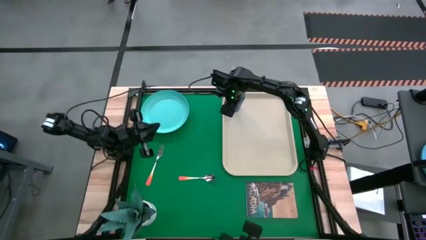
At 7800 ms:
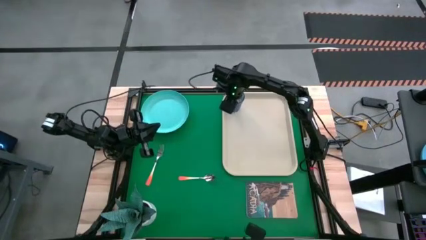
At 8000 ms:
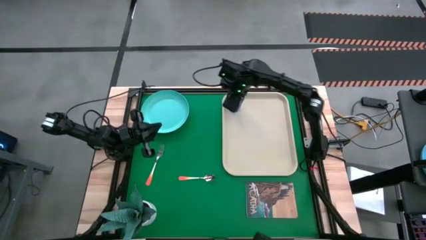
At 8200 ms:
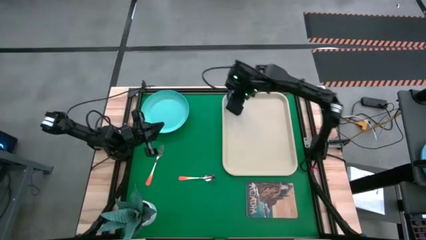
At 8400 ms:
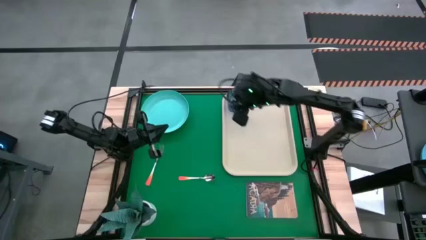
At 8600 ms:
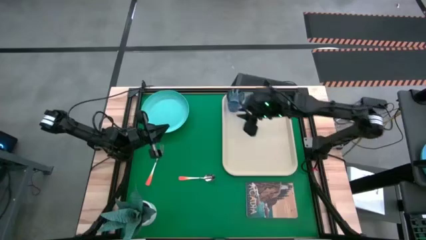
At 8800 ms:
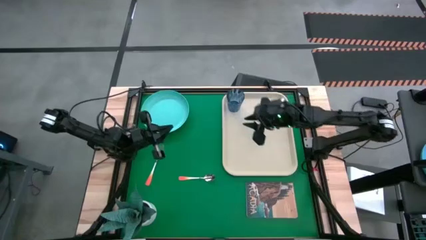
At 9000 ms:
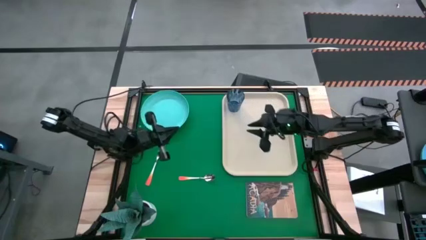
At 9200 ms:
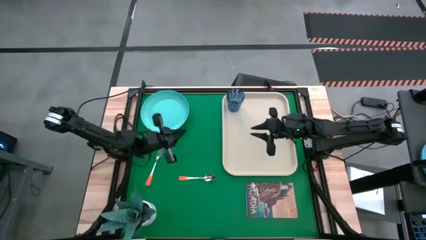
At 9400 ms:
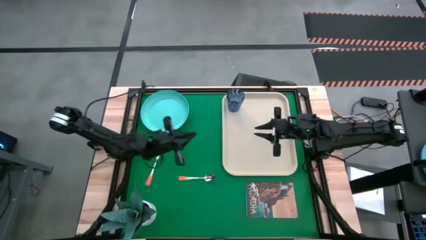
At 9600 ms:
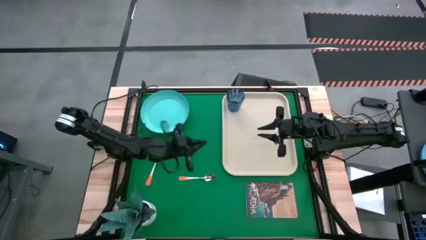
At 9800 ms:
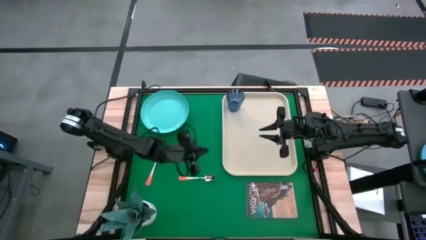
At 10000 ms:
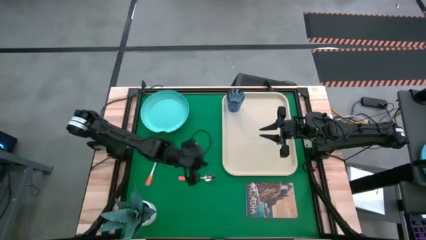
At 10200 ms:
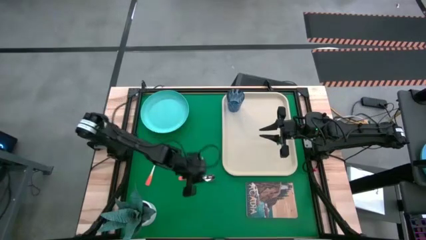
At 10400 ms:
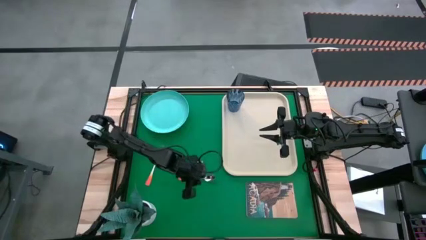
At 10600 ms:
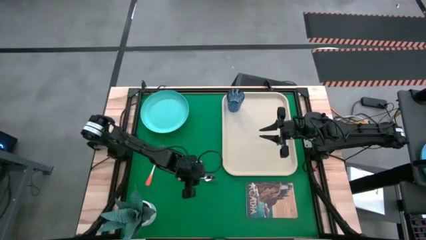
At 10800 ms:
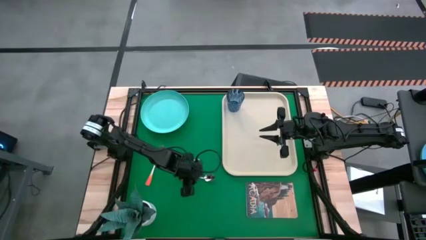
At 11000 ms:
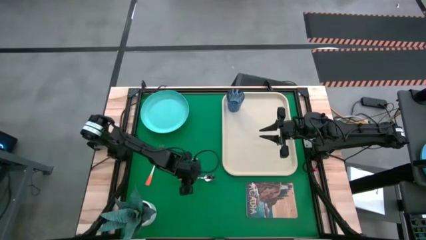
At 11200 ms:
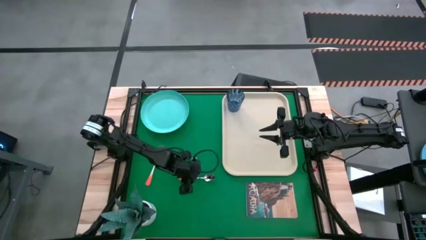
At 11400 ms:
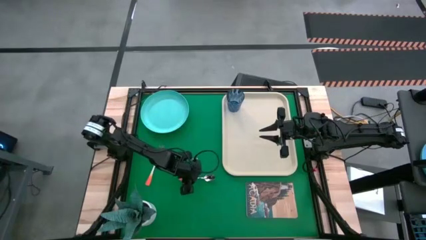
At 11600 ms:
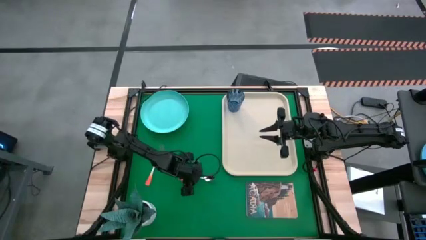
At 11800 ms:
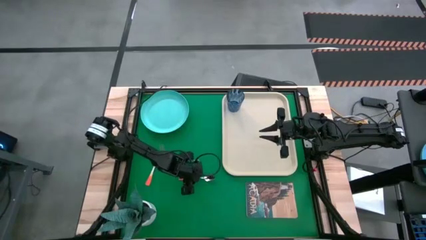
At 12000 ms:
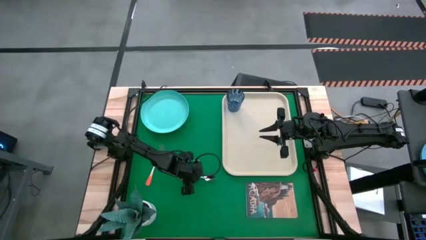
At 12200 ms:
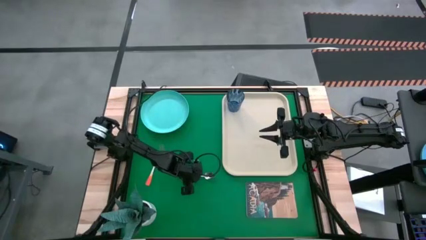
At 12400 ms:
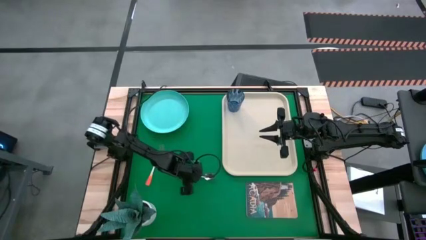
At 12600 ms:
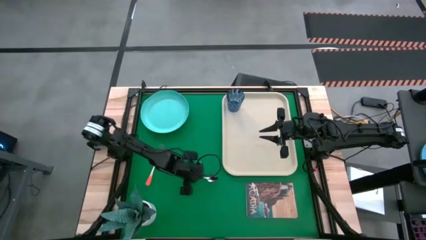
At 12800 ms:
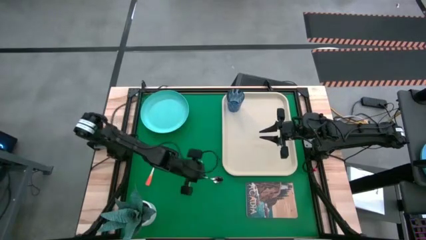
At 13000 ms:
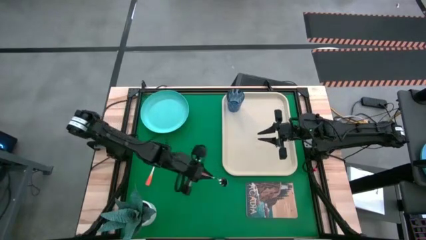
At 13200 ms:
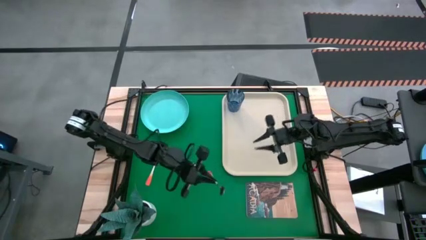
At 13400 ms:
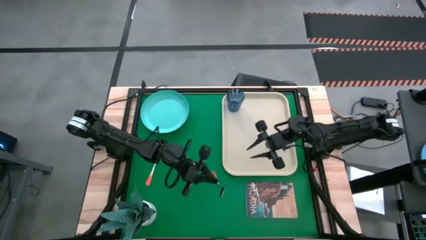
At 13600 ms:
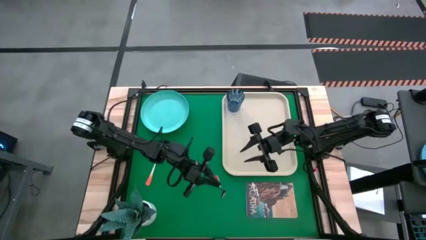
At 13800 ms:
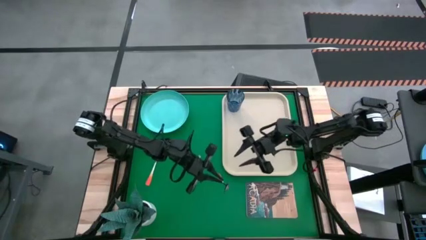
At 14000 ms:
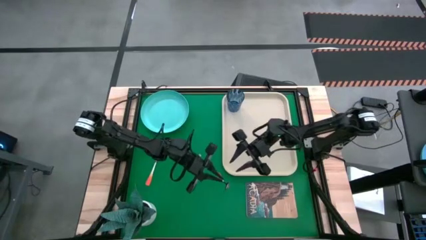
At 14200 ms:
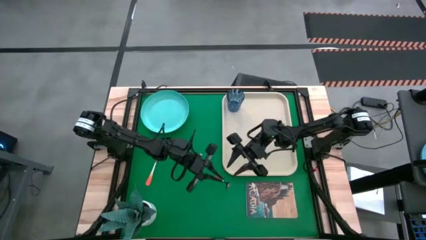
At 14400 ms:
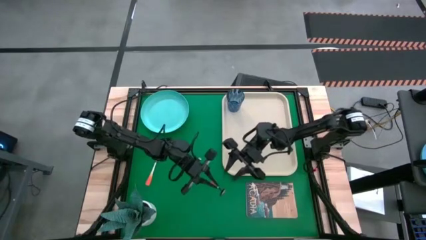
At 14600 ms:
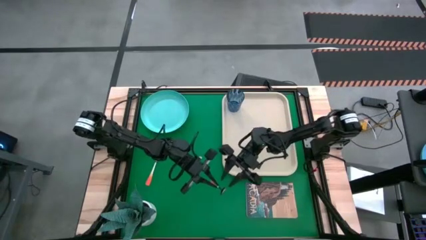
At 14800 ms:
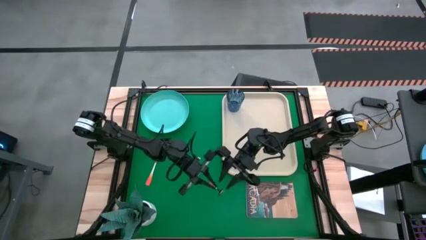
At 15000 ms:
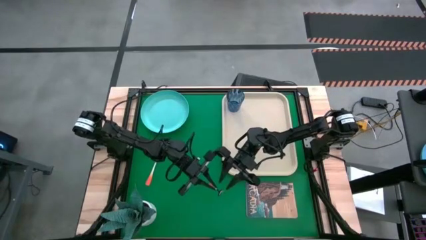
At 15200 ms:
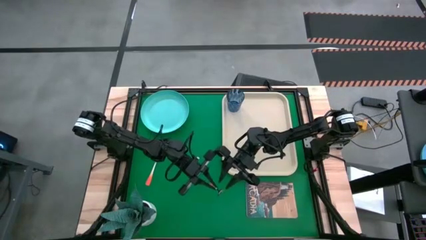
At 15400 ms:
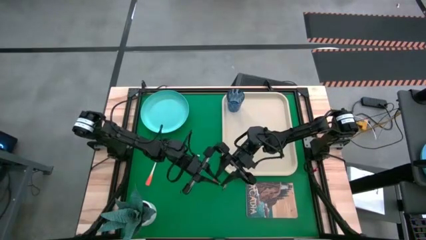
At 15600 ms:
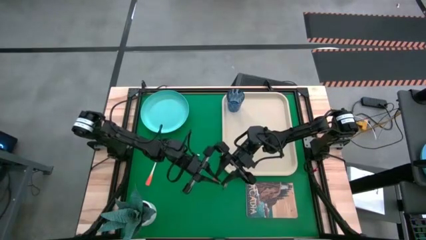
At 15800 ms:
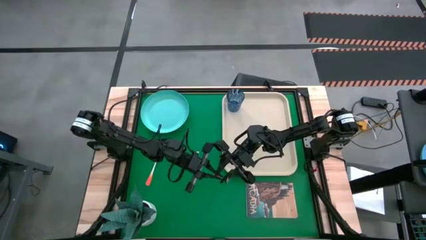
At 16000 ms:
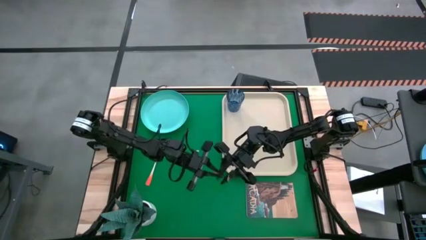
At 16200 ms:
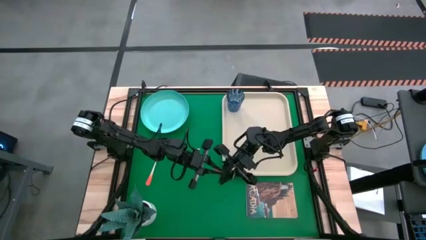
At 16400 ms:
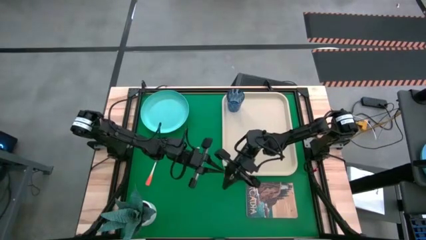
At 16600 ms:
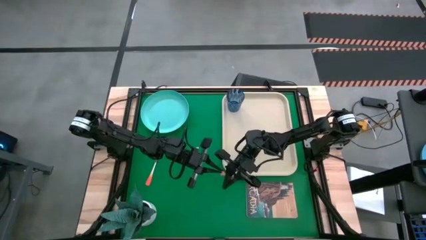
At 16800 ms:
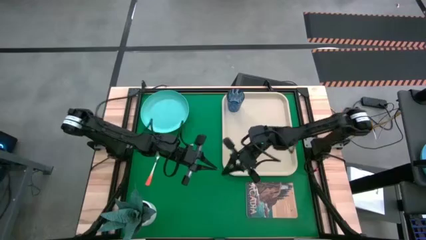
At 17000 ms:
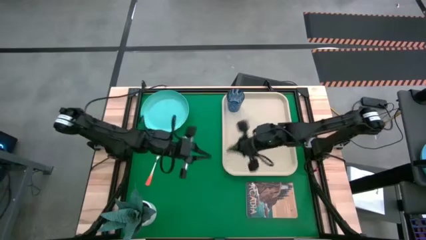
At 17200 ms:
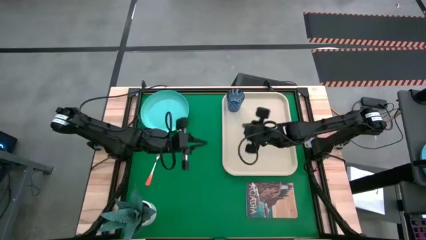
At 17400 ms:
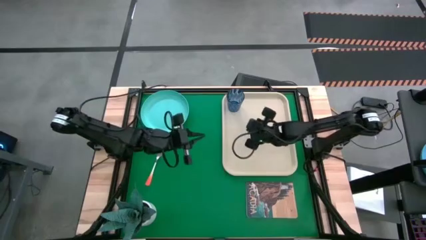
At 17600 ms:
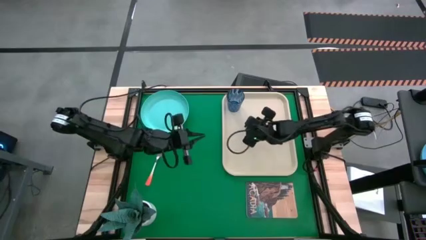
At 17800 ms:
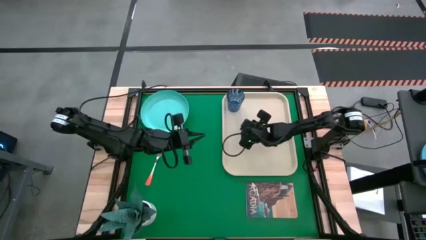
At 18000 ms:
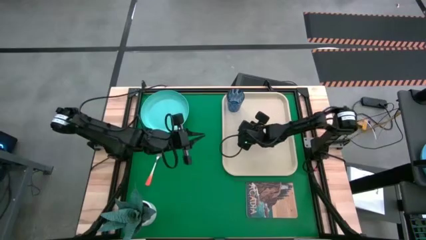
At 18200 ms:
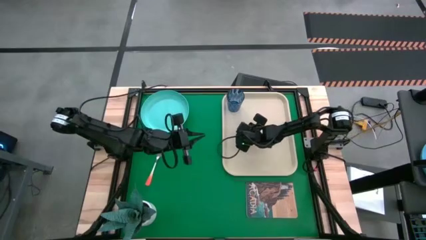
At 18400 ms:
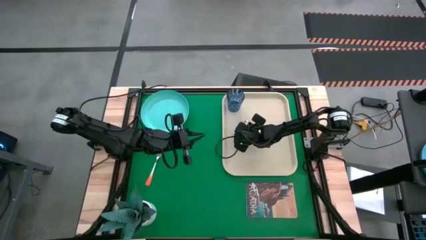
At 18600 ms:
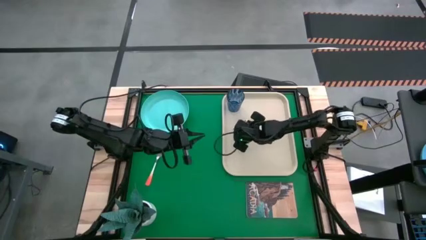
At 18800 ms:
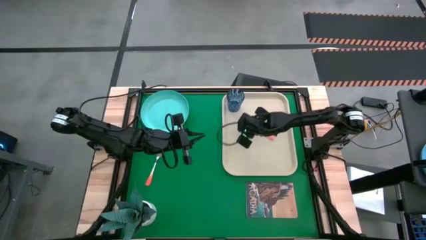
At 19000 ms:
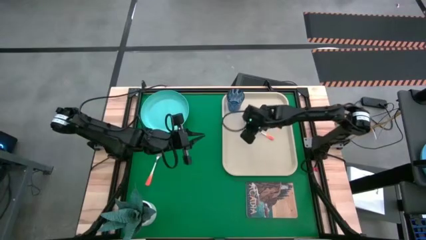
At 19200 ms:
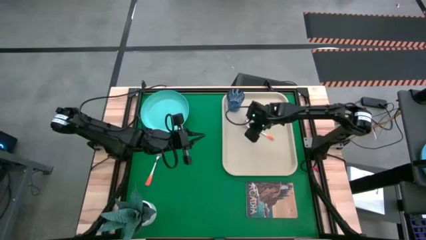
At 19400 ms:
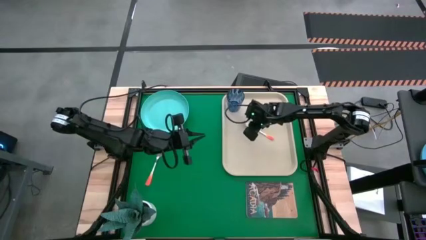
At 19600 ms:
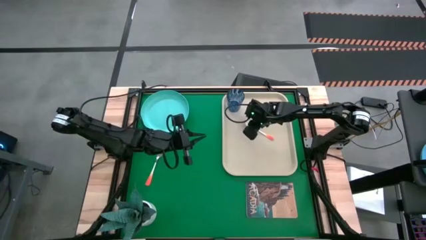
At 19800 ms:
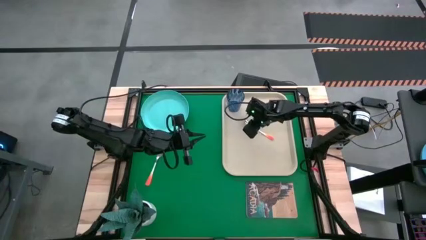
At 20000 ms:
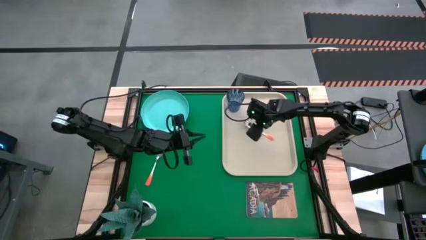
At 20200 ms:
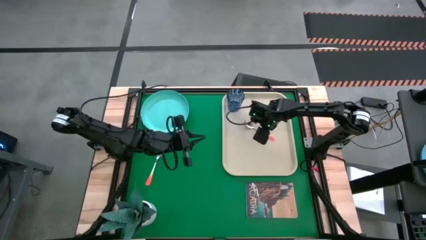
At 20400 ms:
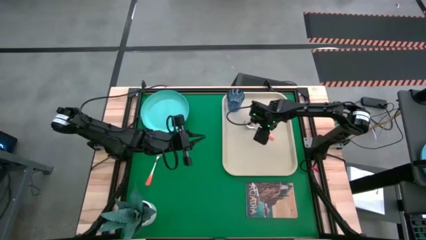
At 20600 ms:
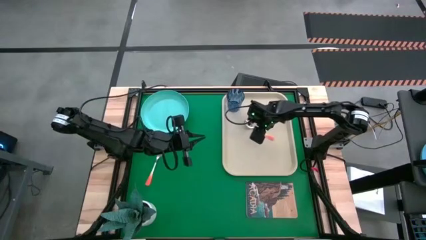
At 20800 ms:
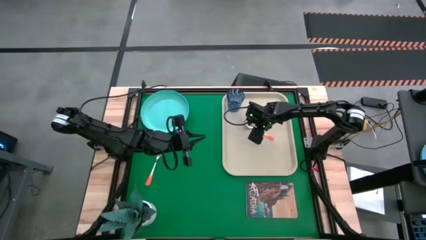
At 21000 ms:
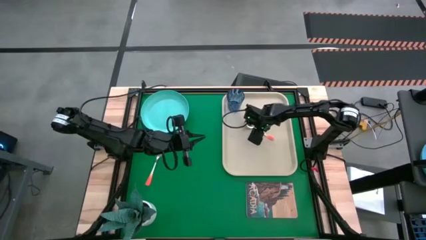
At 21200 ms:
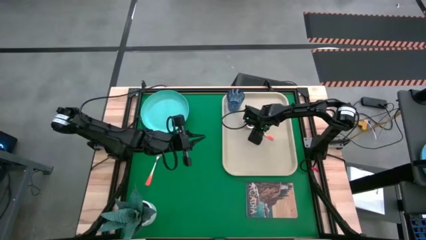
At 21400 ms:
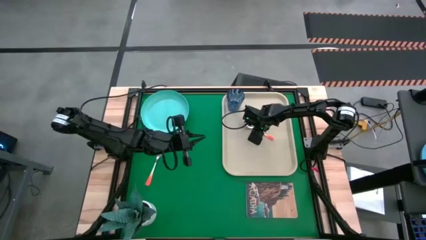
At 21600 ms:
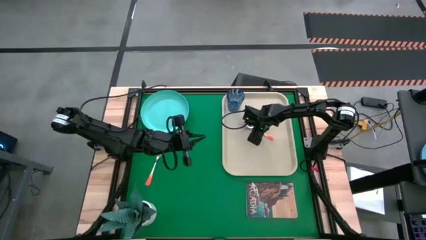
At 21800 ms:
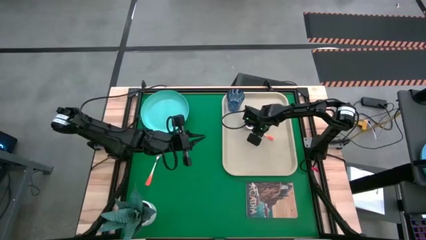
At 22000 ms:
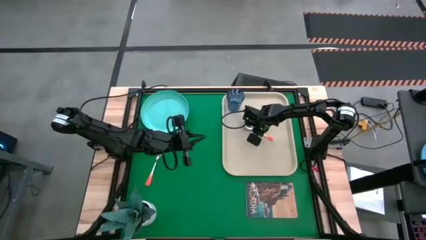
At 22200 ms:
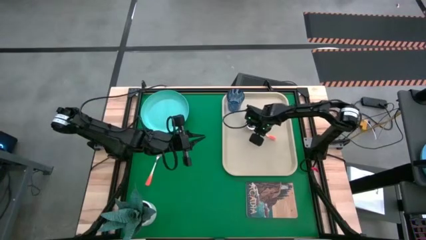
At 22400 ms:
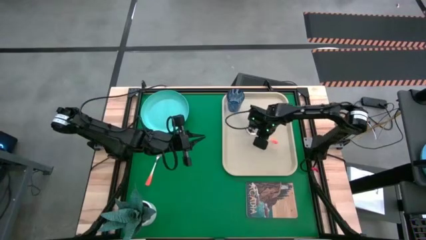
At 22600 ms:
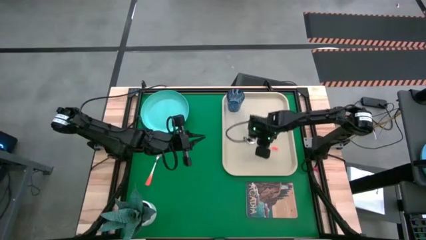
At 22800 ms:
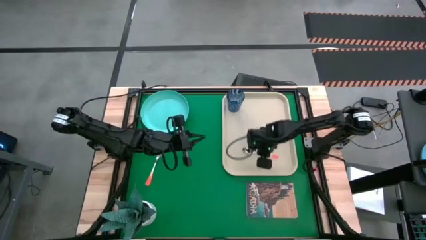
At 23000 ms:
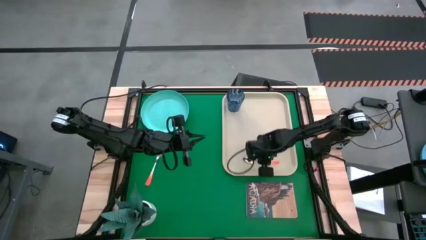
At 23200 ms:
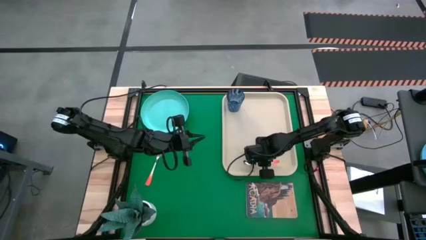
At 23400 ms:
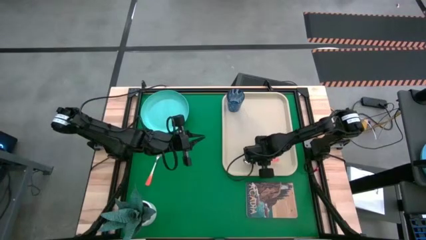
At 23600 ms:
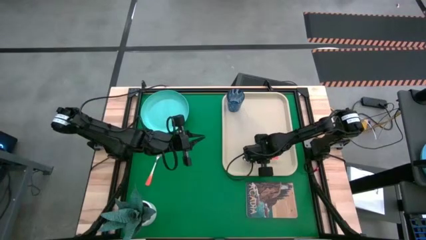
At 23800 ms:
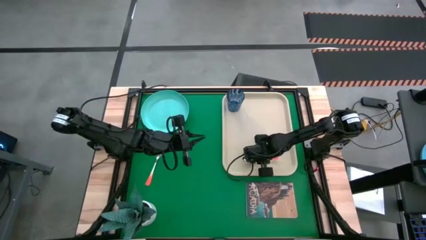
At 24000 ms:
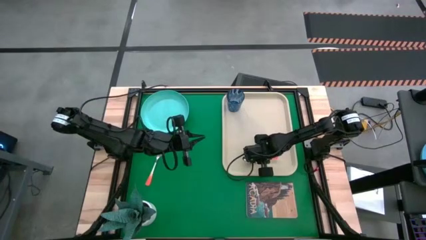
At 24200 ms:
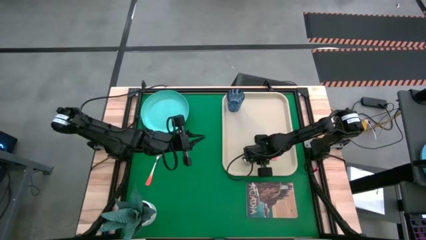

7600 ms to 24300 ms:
Task: Pick and place plate/cup/fork/spoon on tray
Put the orange spoon on the bottom of the white serving tray
